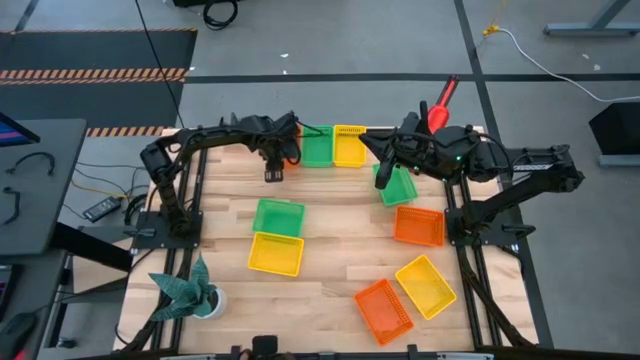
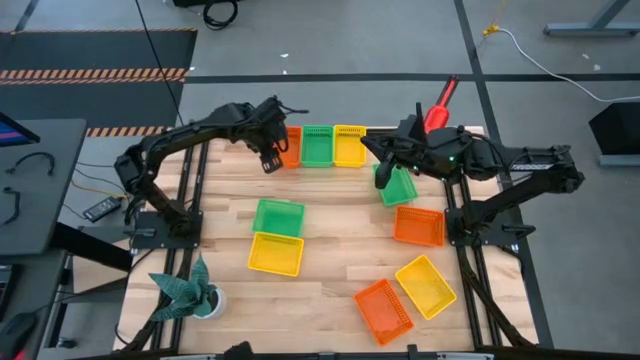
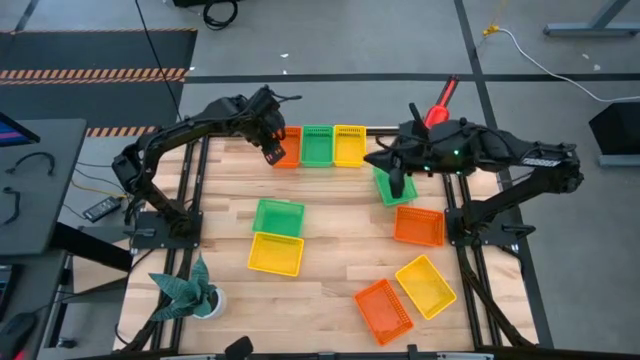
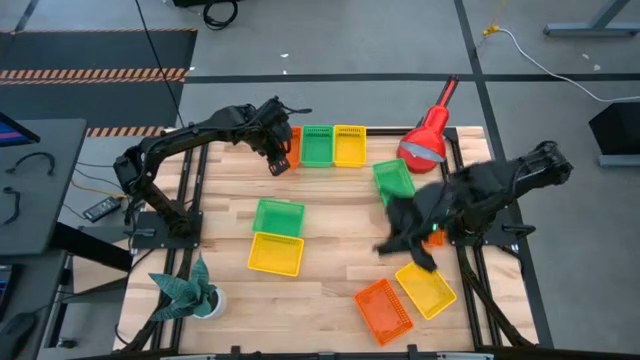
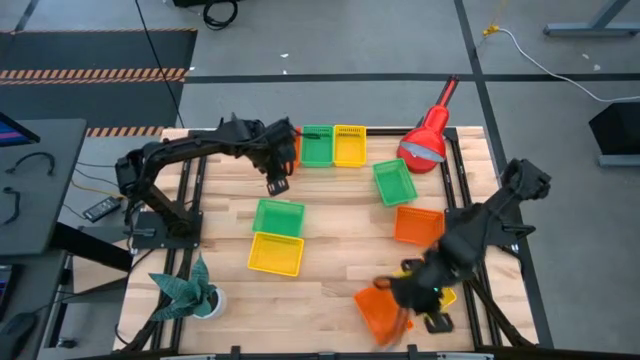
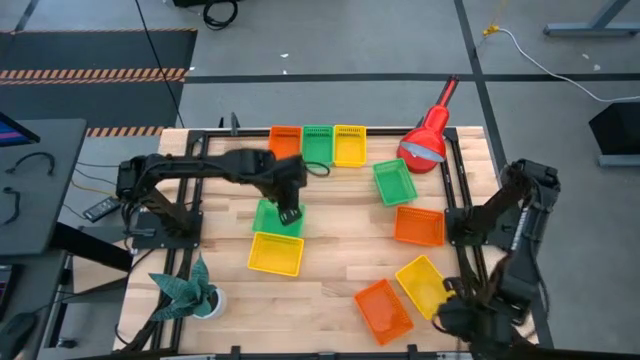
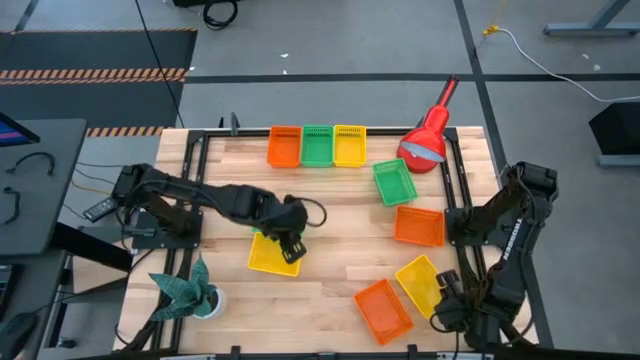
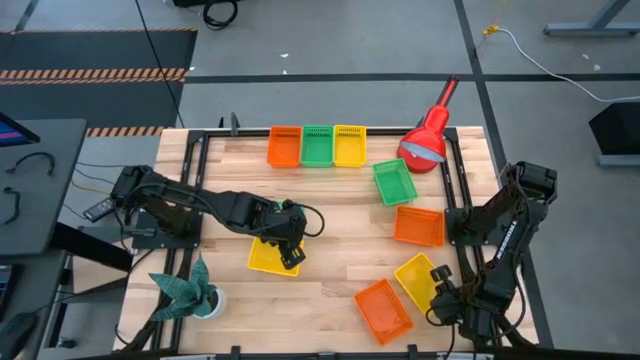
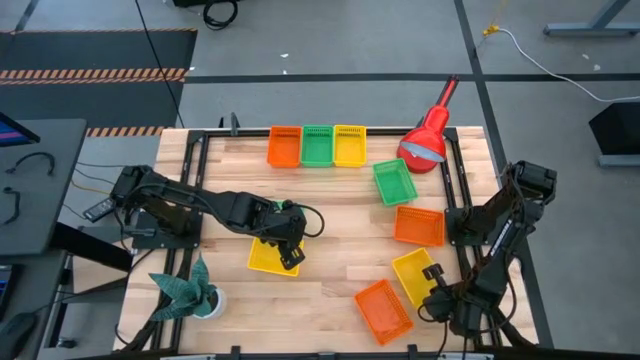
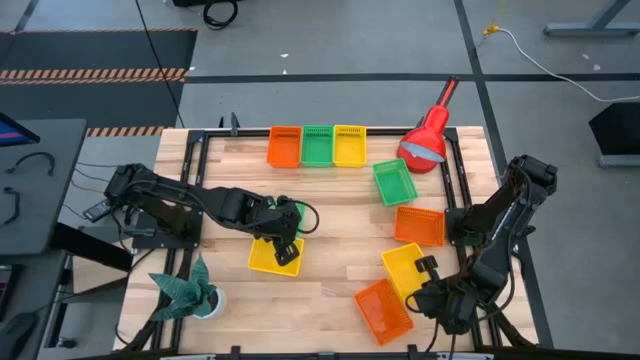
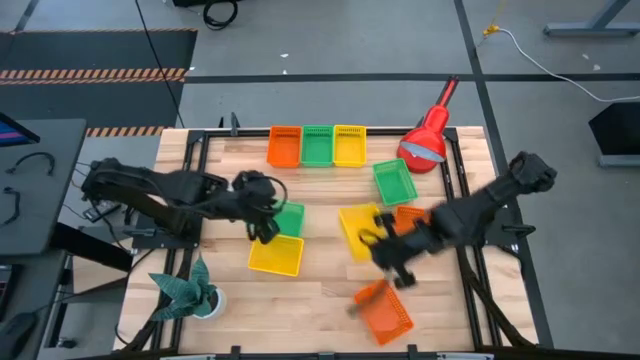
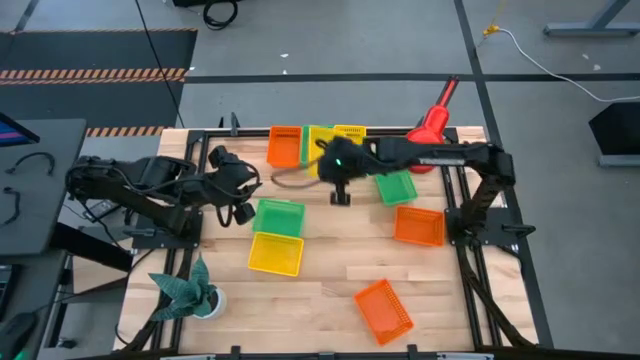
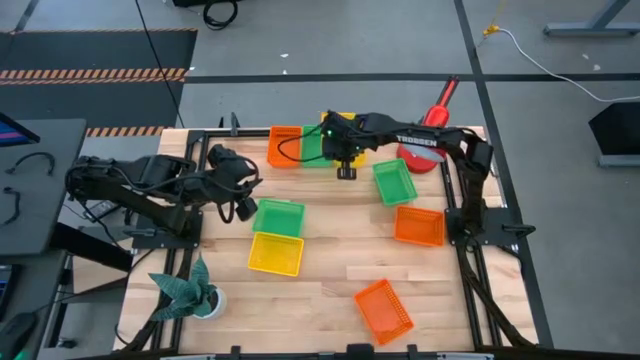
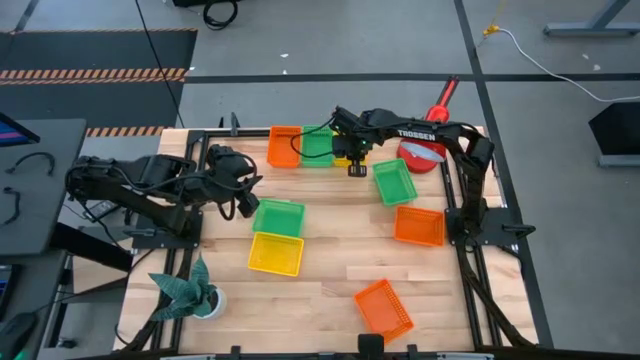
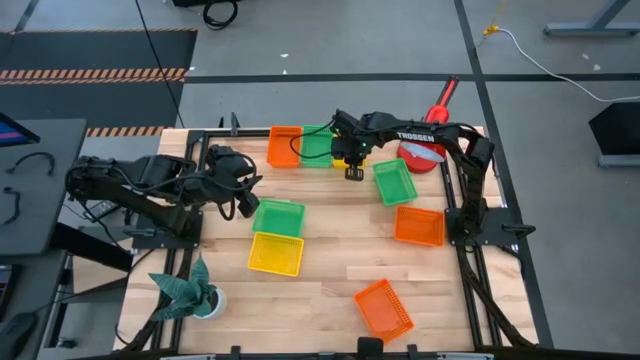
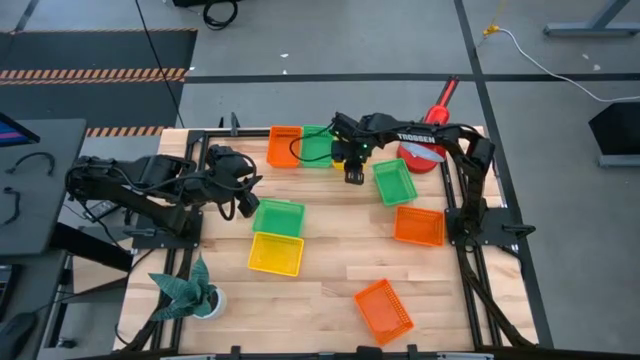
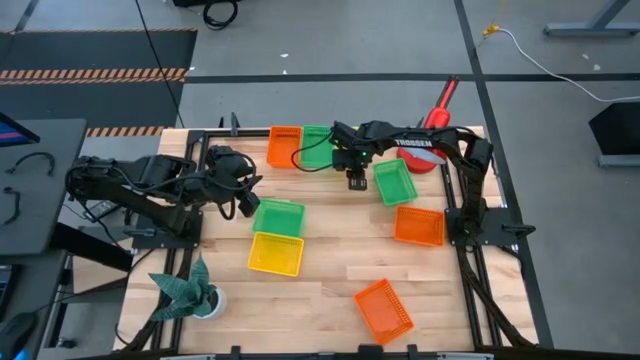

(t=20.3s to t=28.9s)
Stack the yellow bin on top of the yellow bin

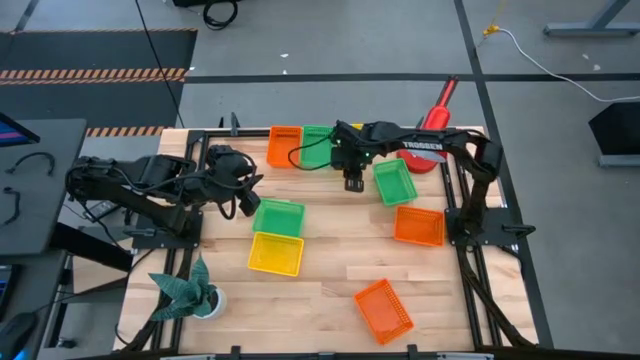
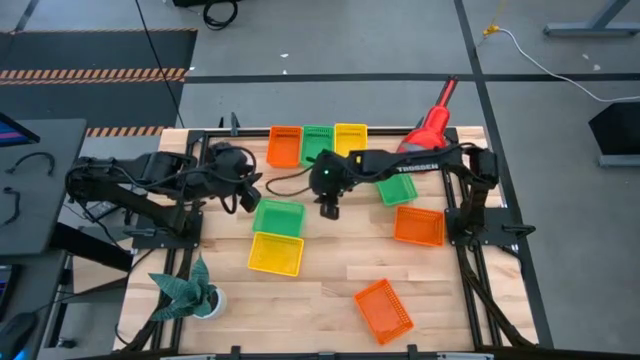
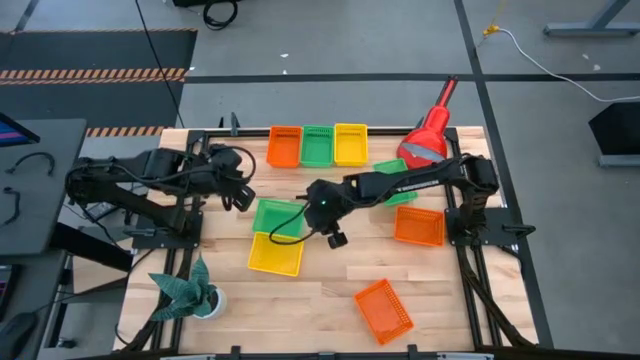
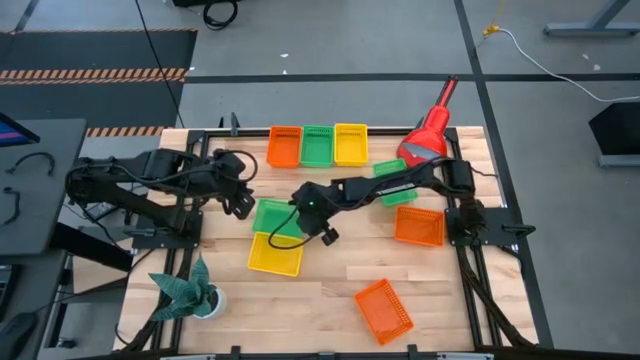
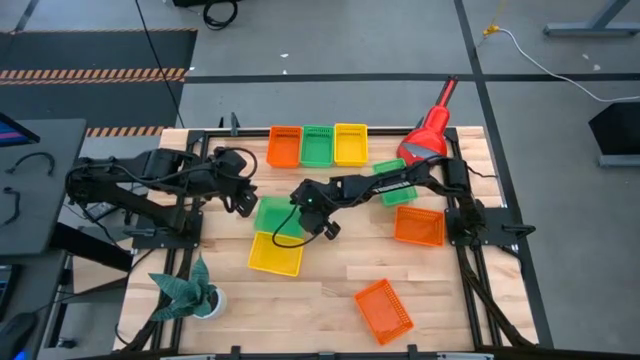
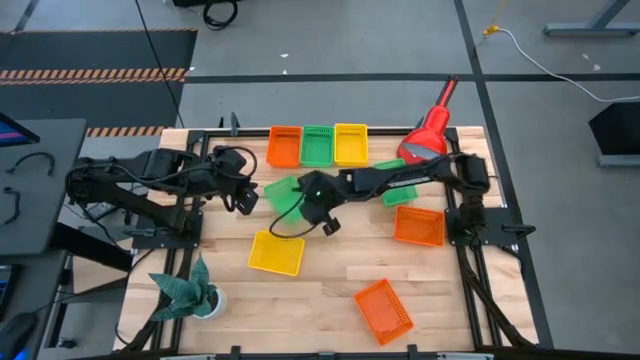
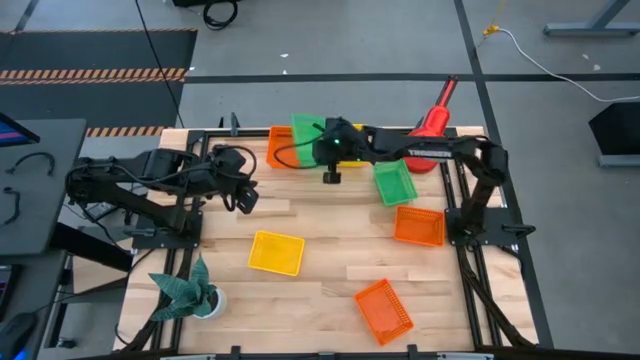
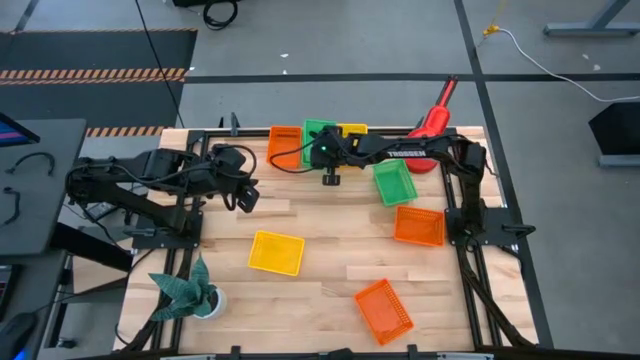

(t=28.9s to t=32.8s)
Stack the green bin on top of the green bin

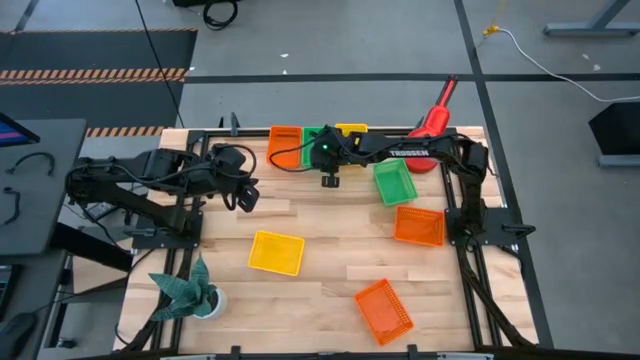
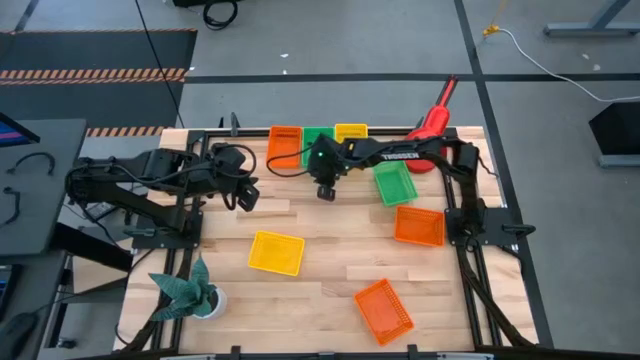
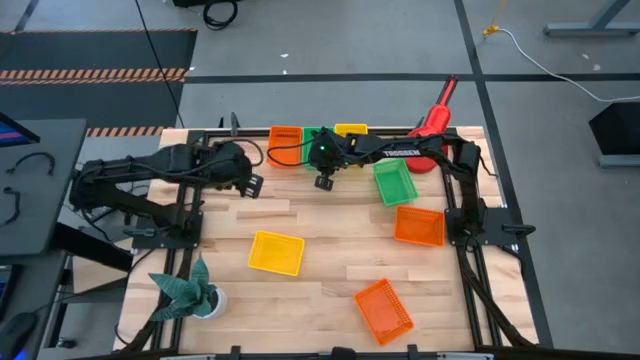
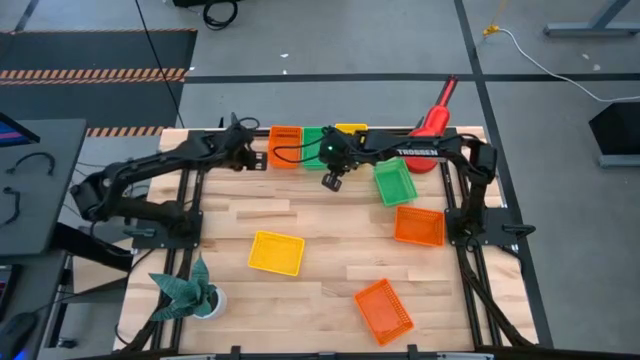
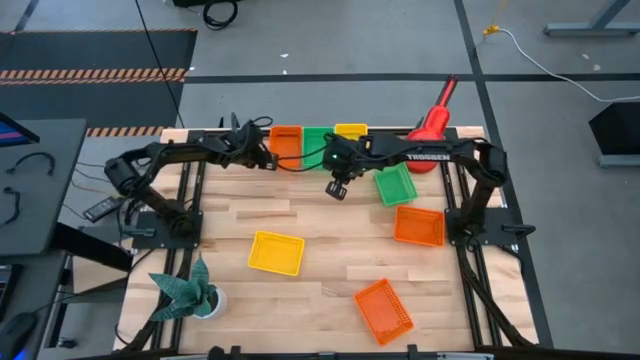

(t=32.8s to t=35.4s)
Adjust the orange bin

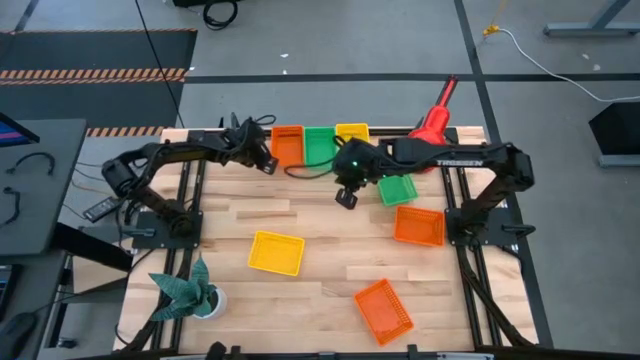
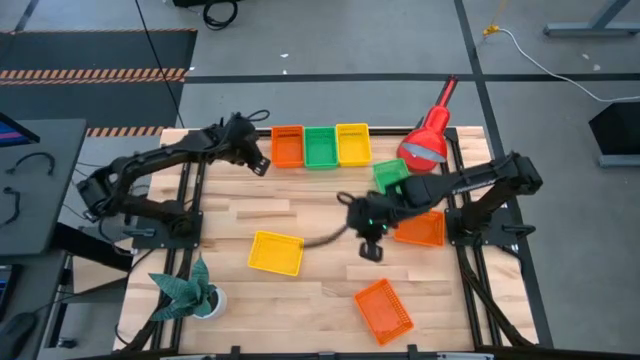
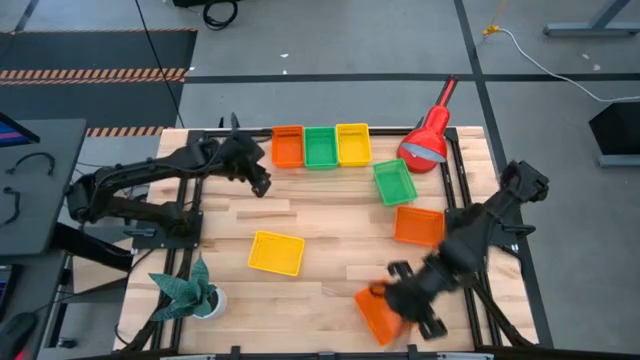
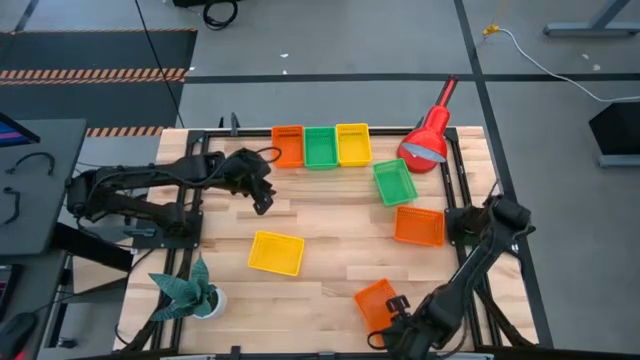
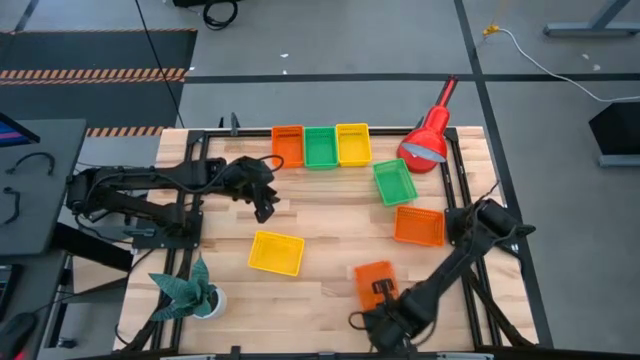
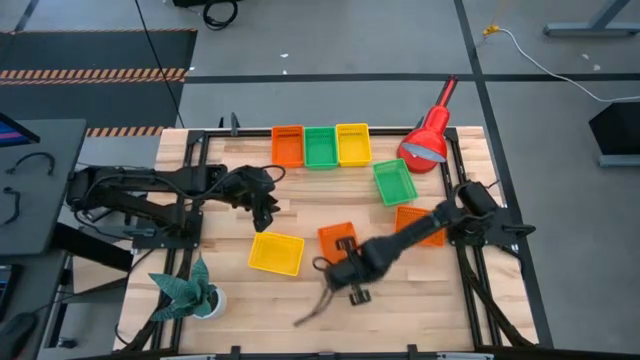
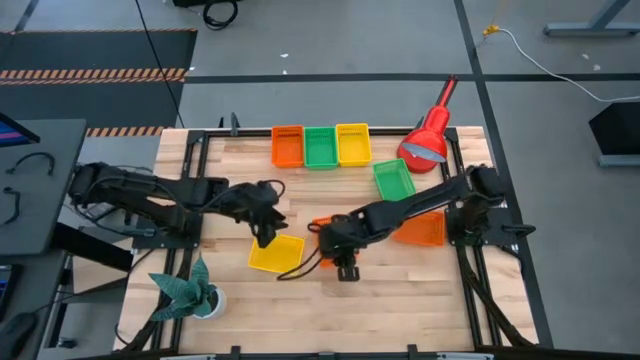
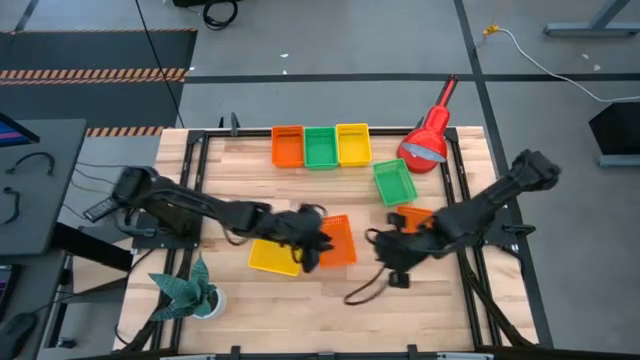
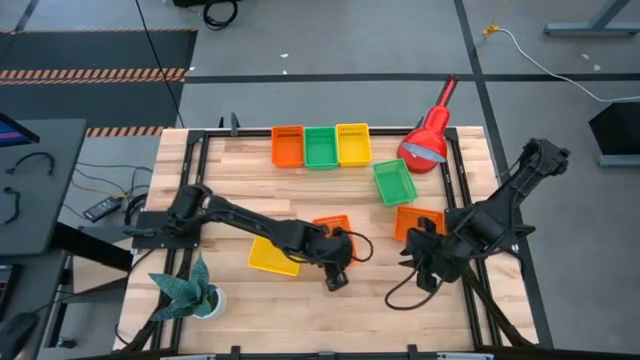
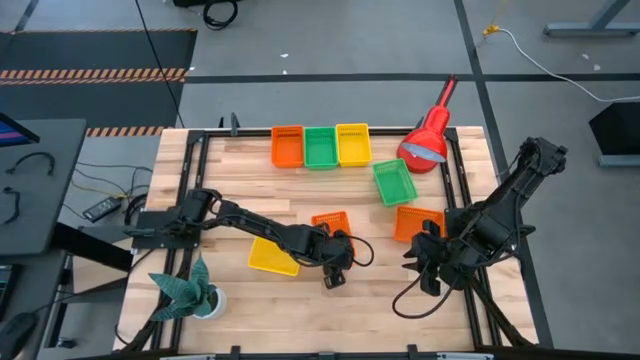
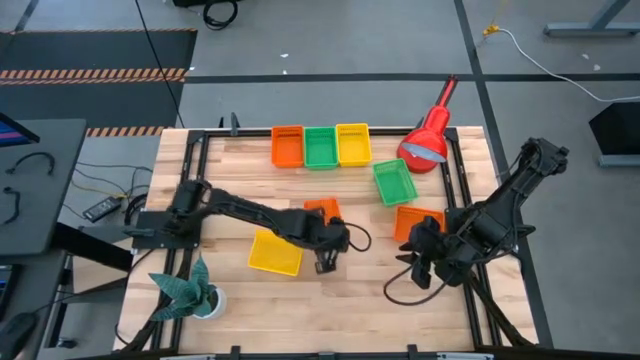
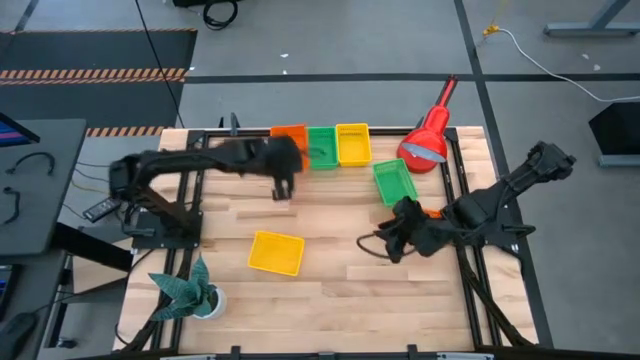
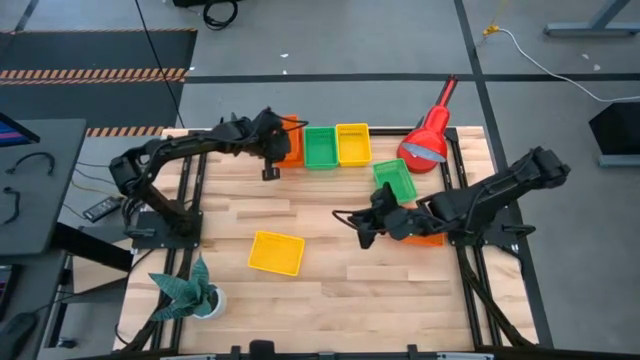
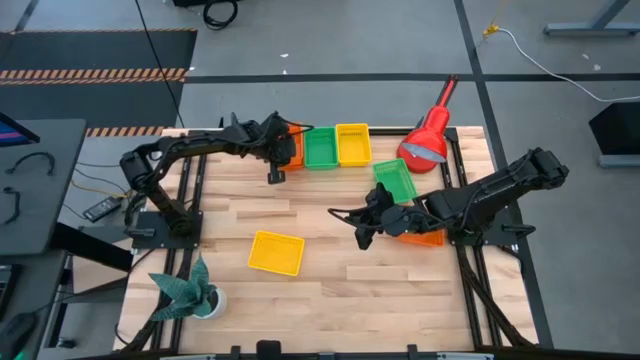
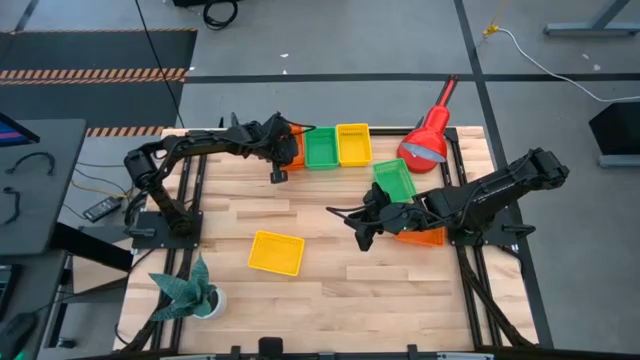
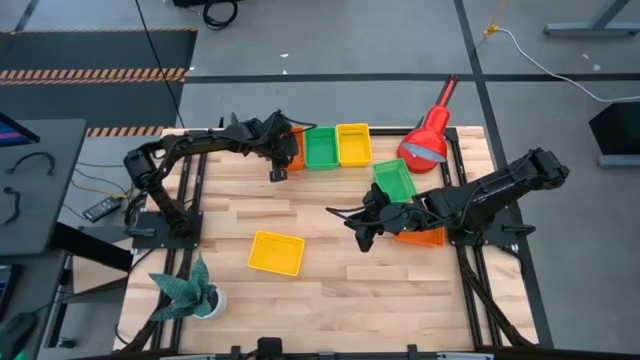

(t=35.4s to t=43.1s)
Stack the orange bin on top of the orange bin
